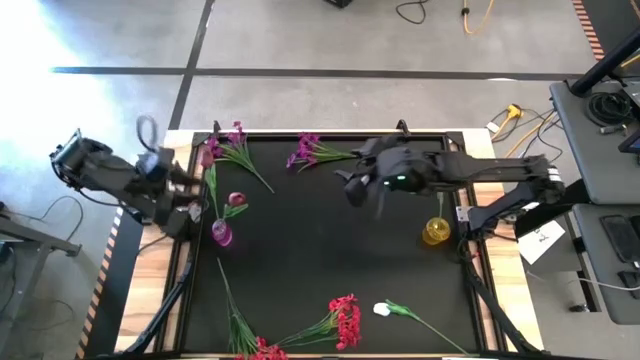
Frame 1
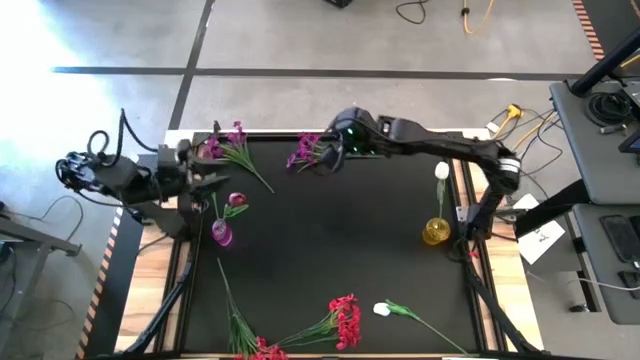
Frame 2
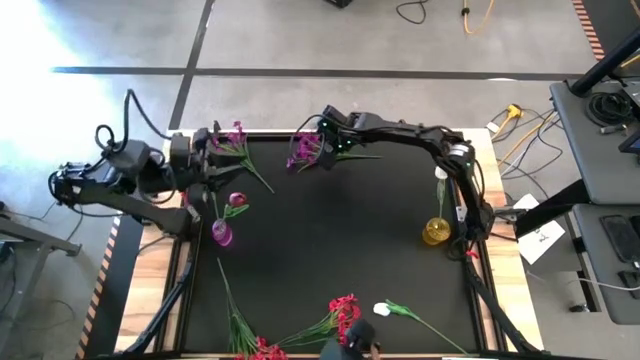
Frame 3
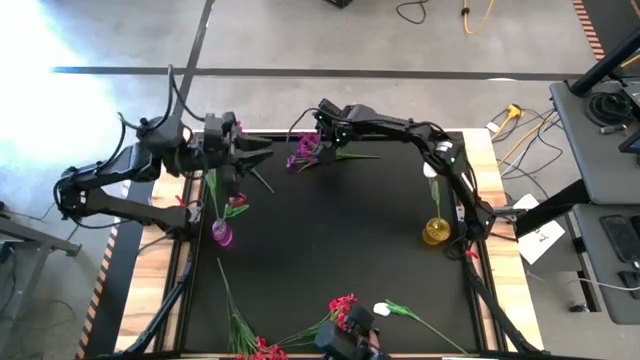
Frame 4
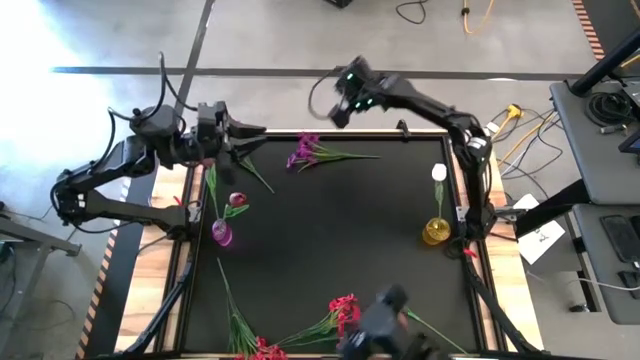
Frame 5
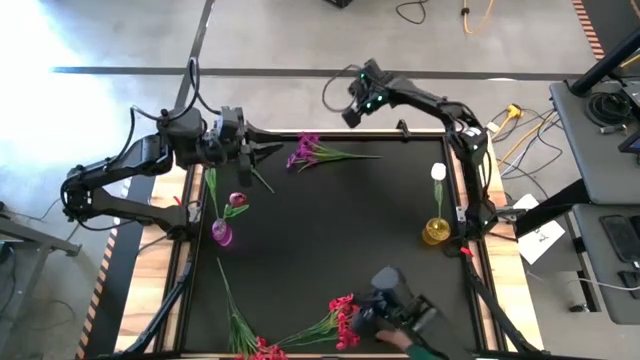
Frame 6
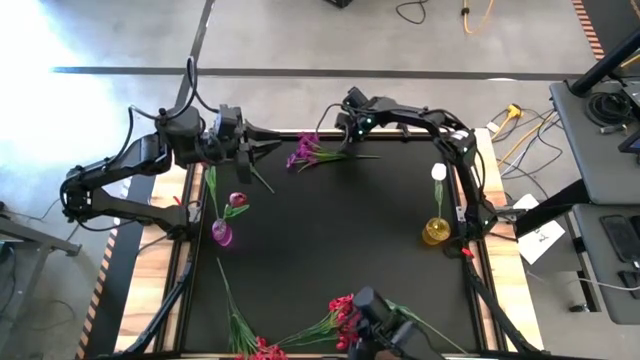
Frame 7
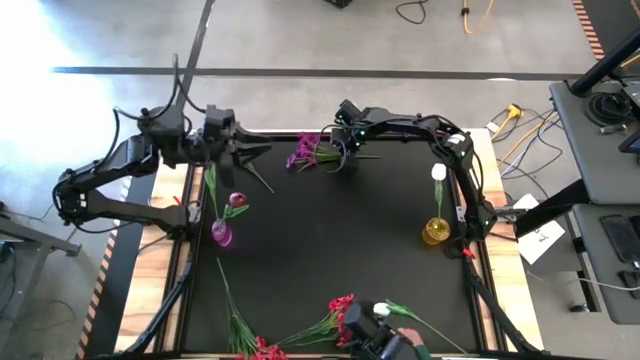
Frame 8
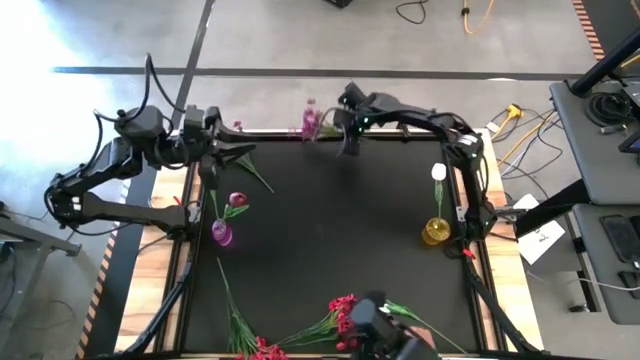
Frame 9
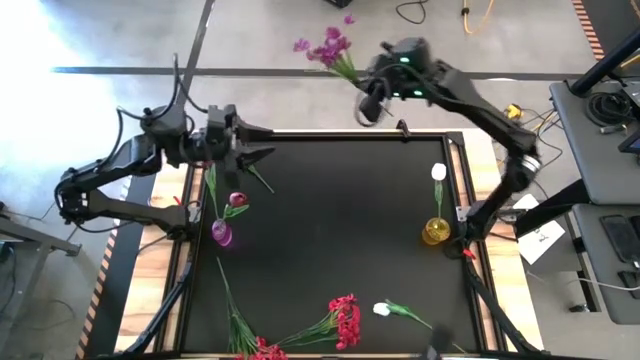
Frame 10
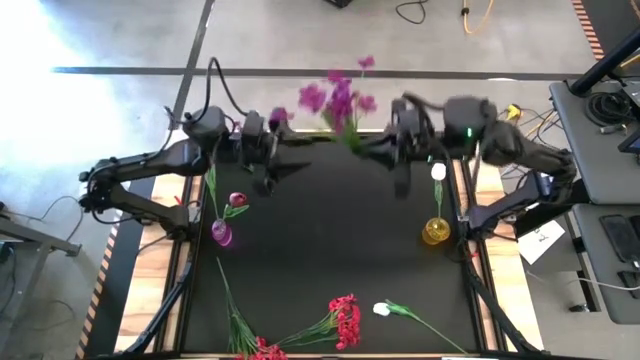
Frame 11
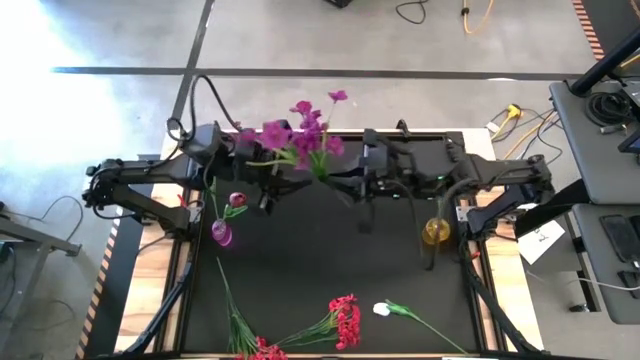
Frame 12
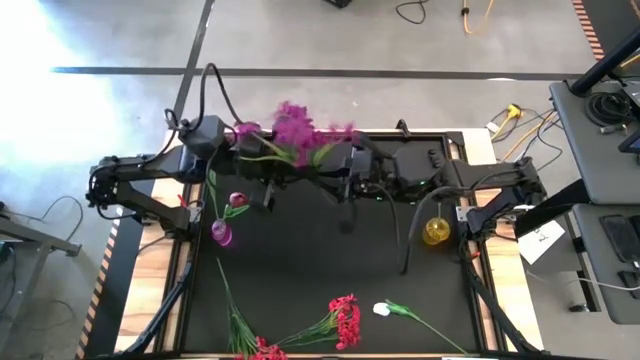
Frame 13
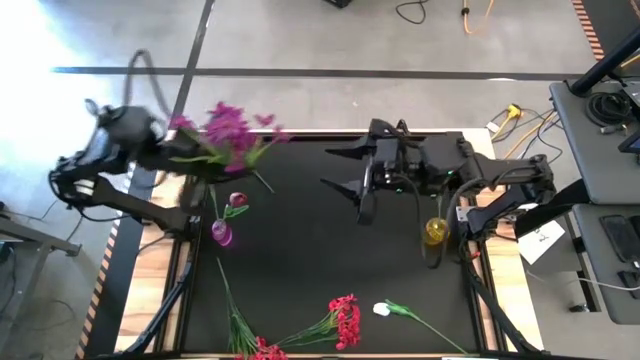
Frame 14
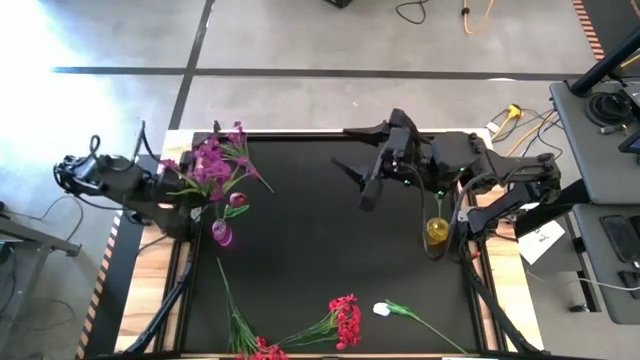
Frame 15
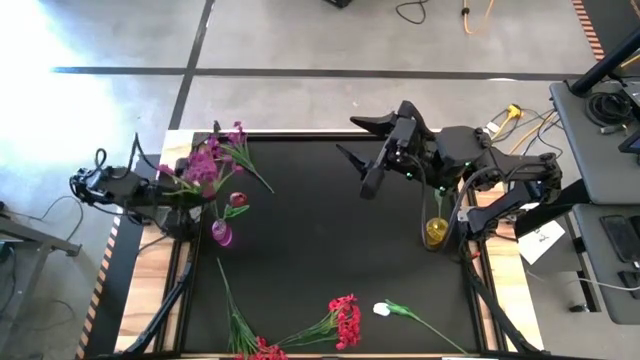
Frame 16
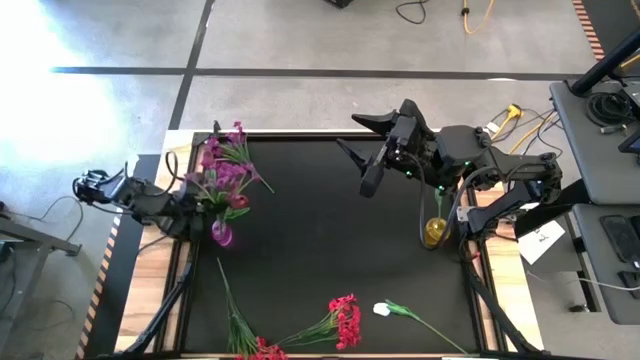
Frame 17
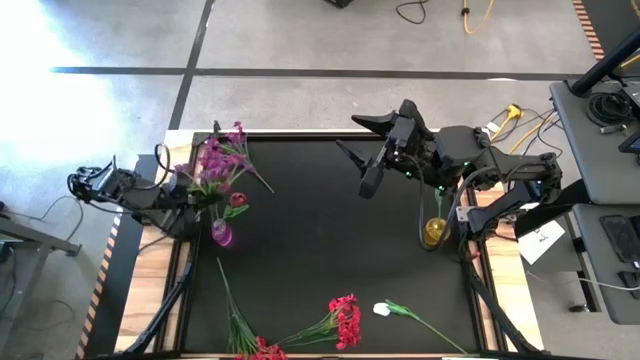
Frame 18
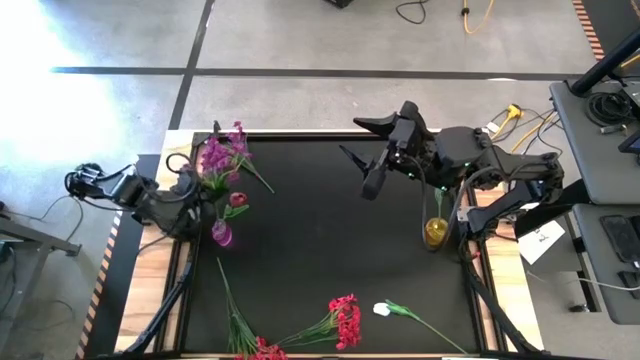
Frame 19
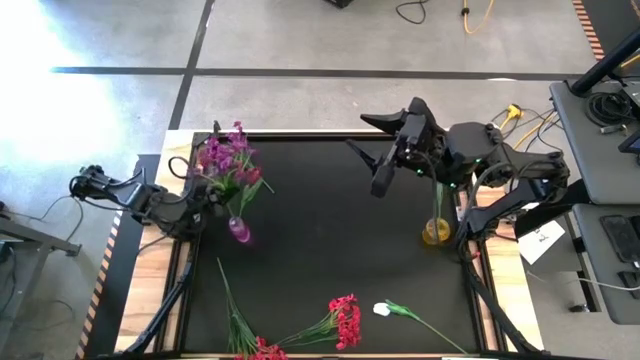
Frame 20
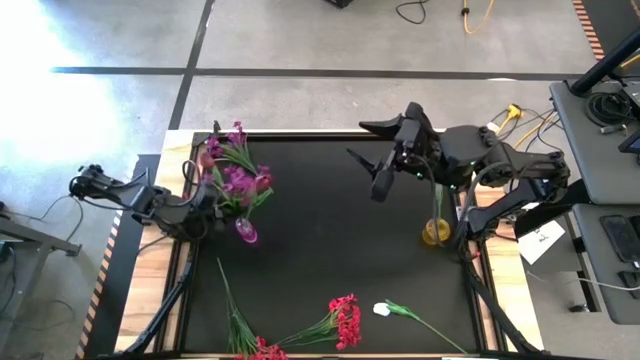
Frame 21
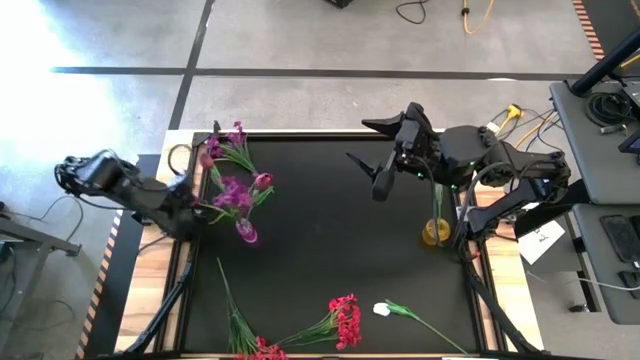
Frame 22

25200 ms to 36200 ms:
Task: Sort flowers into vase by color
Put the right violet flower into the violet flower vase

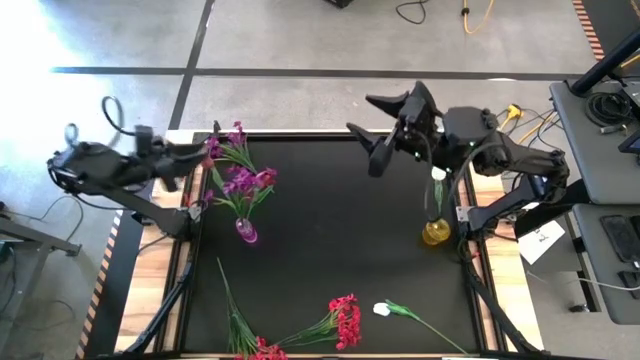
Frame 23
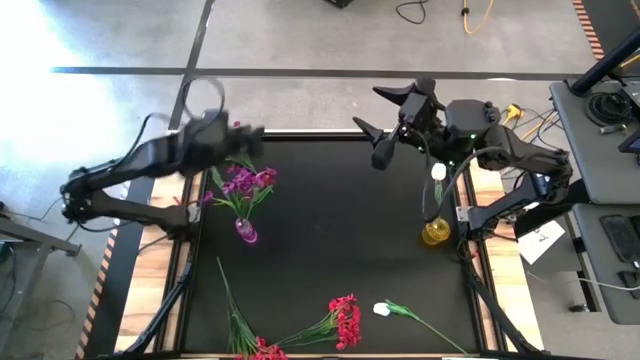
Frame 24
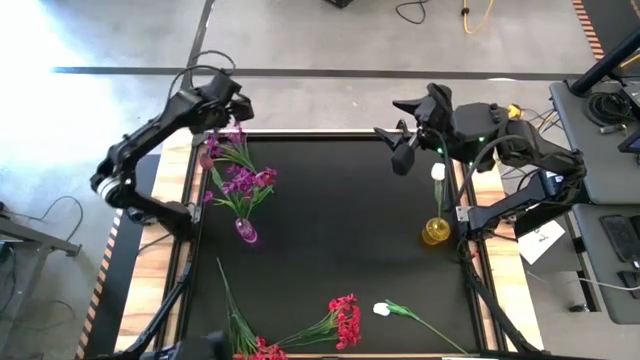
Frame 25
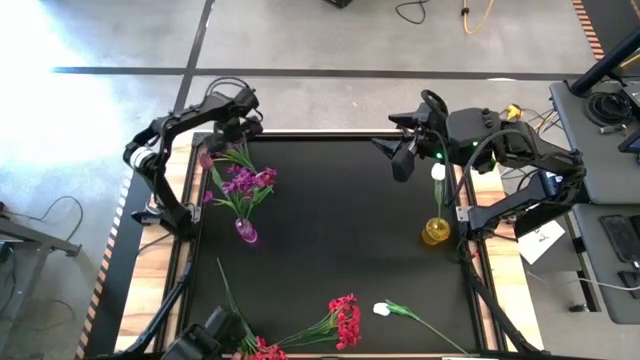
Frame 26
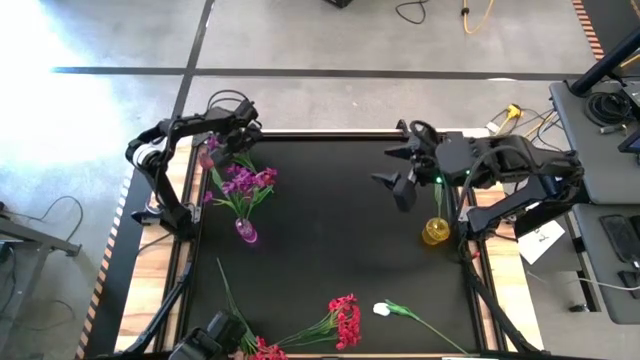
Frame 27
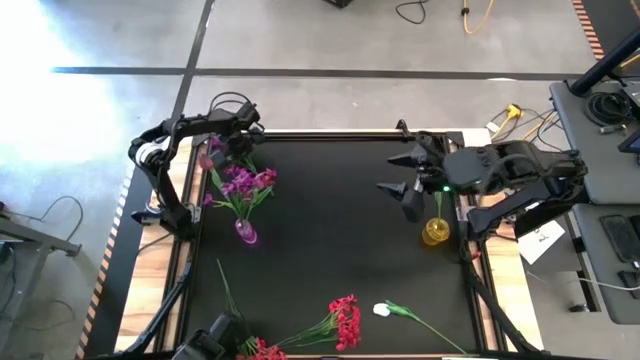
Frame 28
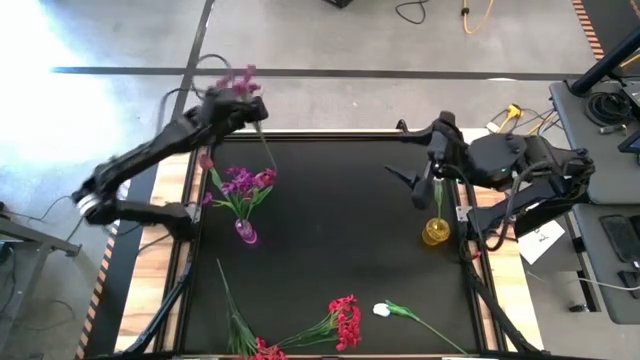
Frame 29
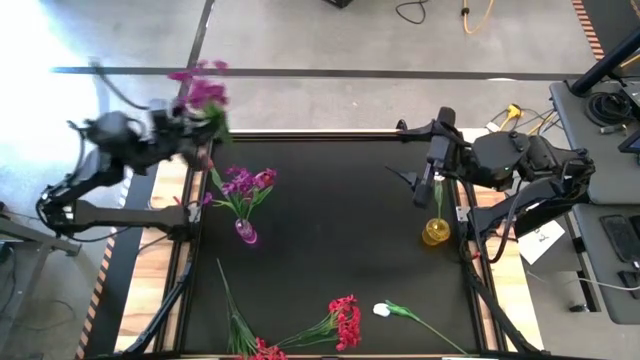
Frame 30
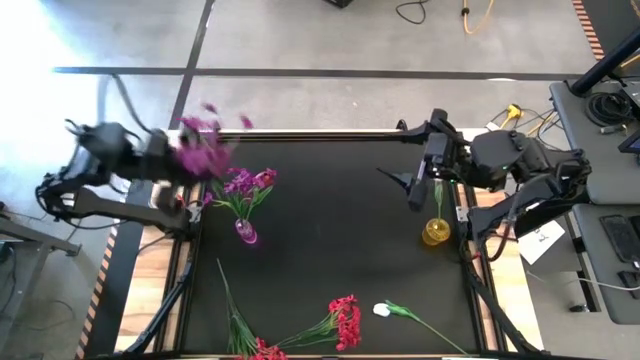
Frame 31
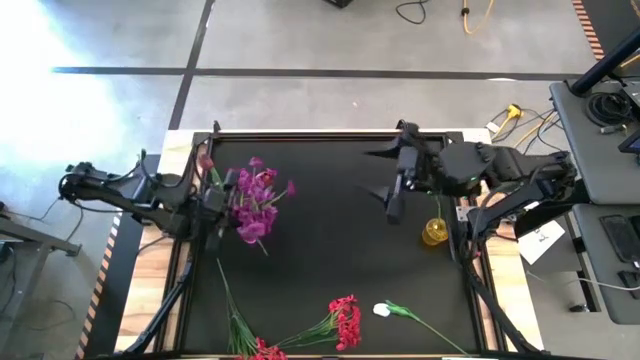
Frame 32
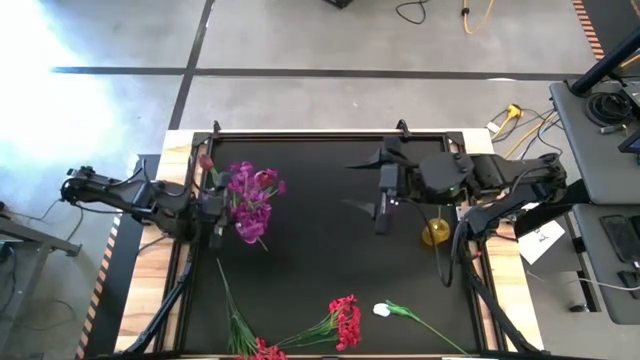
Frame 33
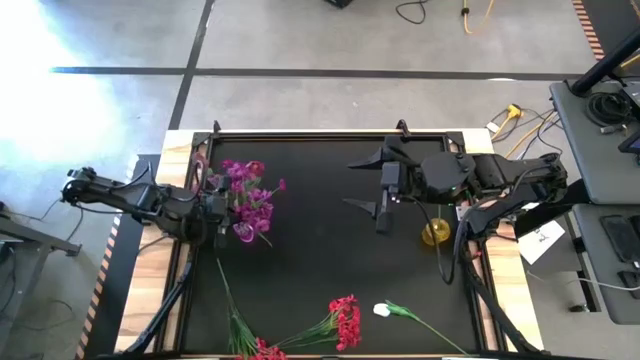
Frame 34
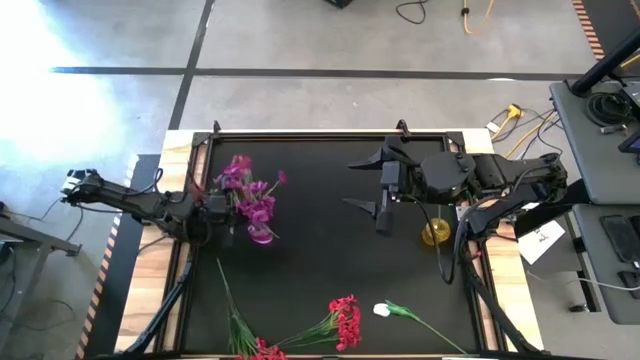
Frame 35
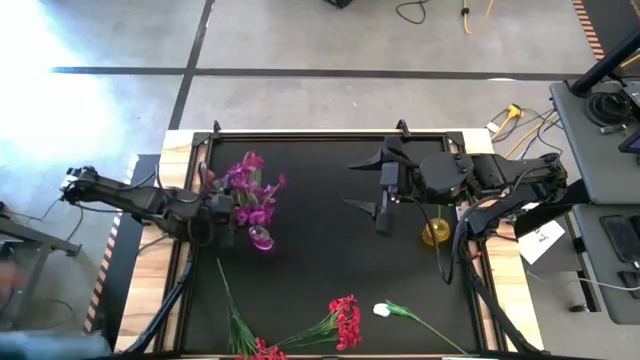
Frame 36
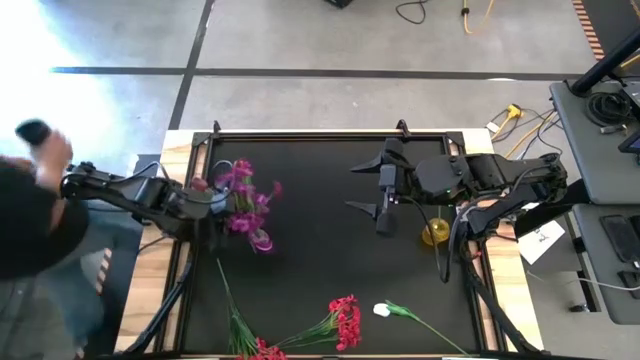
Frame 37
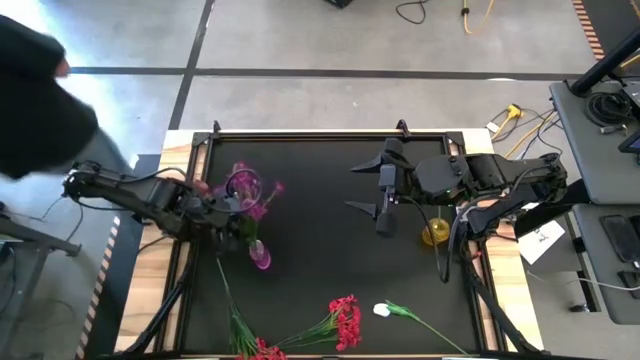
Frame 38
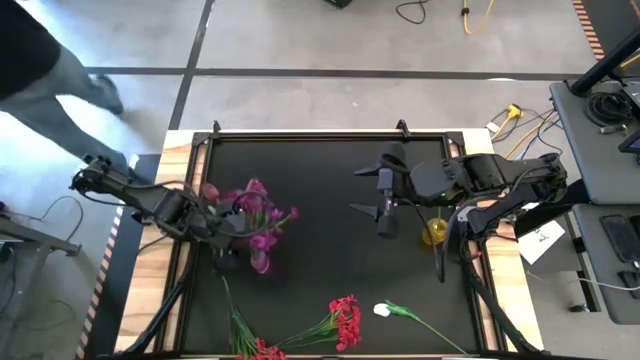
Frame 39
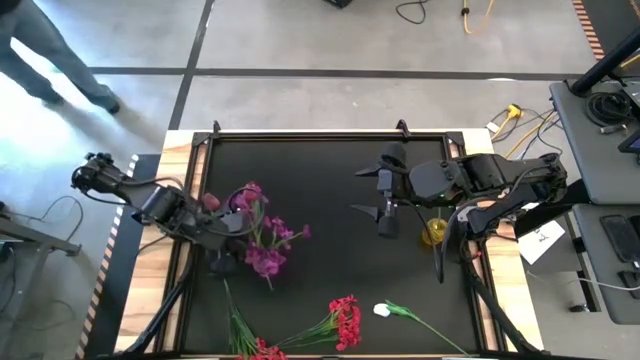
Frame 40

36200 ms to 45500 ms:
Put the violet flower into the violet flower vase

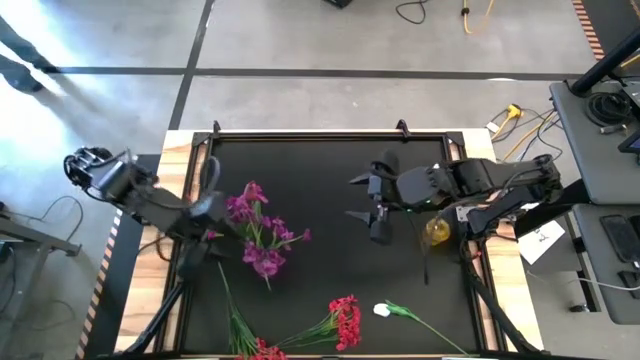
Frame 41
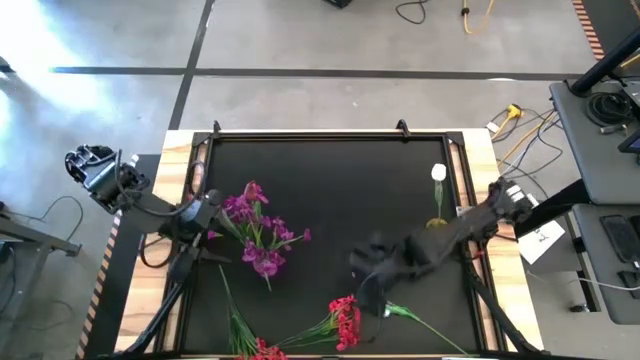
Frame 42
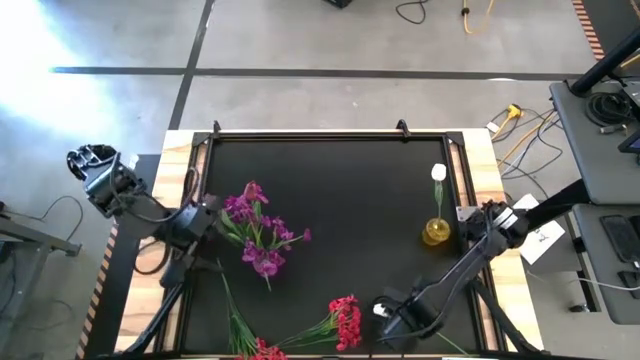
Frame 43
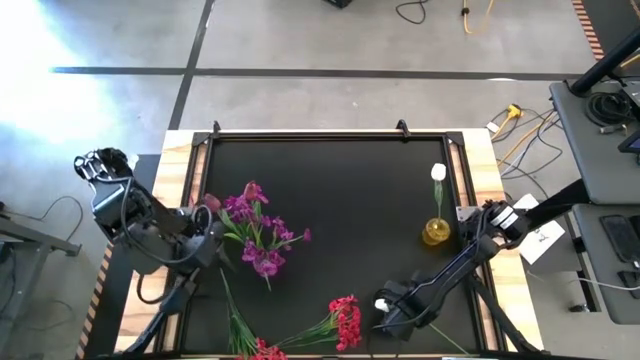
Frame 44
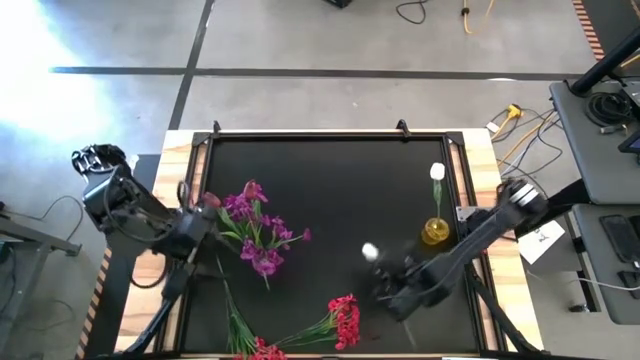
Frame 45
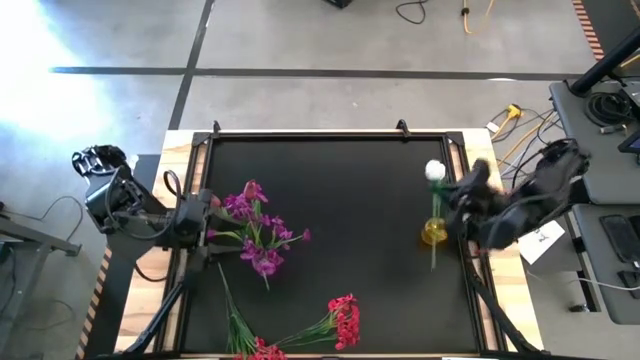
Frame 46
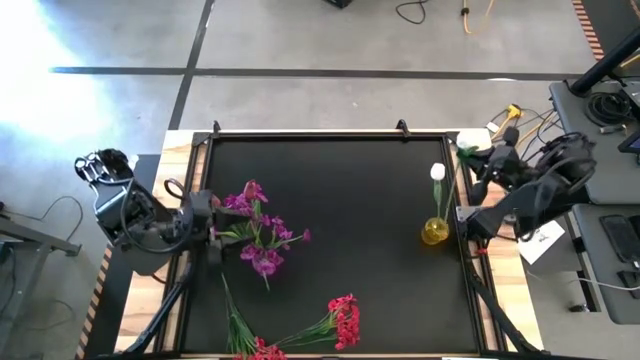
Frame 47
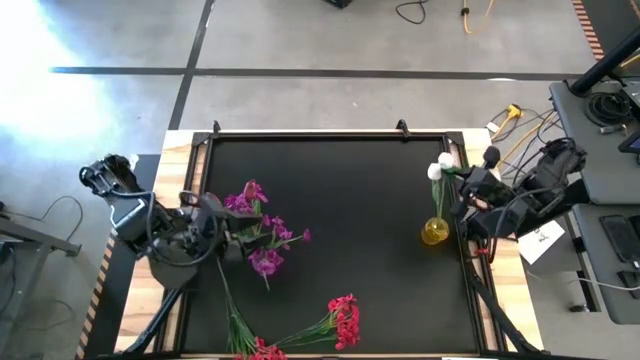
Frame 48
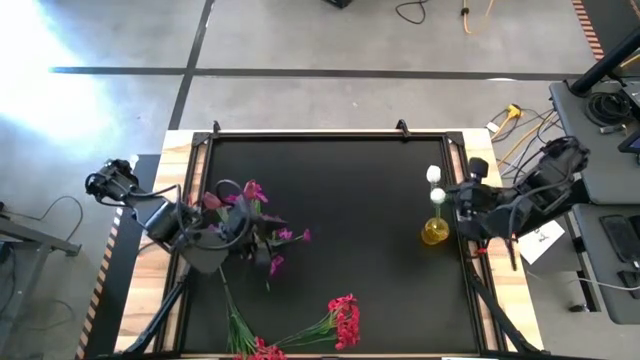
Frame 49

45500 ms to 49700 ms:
Put the white tulip into the yellow flower vase
